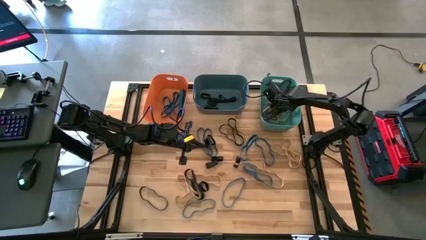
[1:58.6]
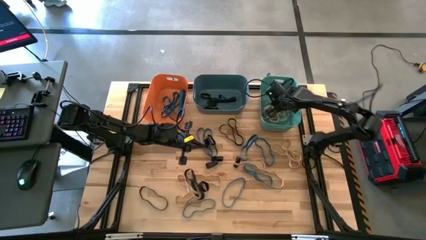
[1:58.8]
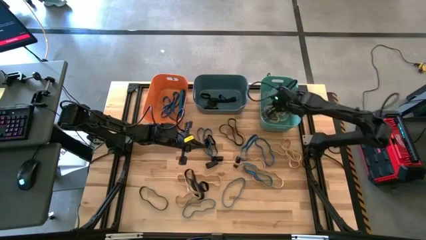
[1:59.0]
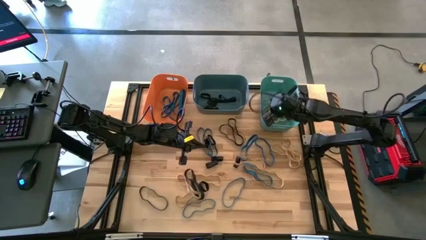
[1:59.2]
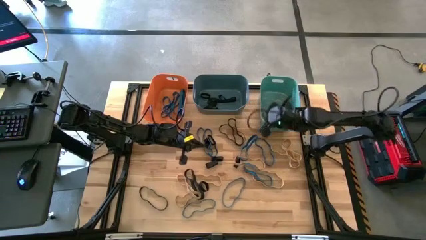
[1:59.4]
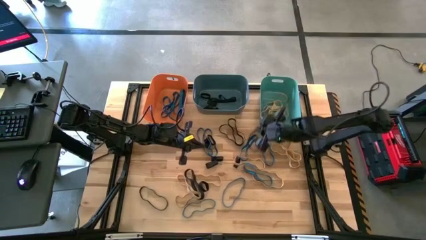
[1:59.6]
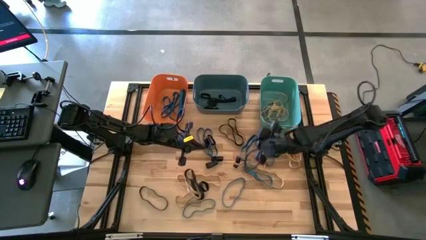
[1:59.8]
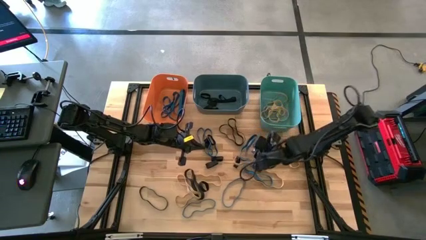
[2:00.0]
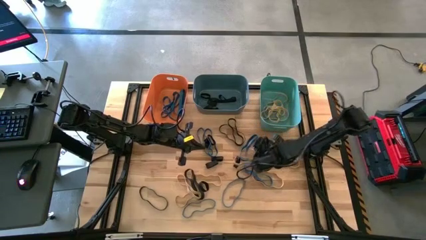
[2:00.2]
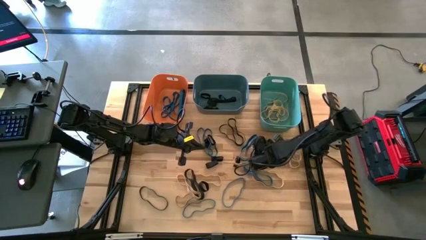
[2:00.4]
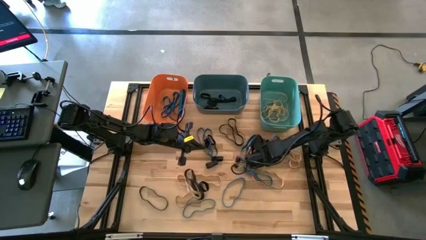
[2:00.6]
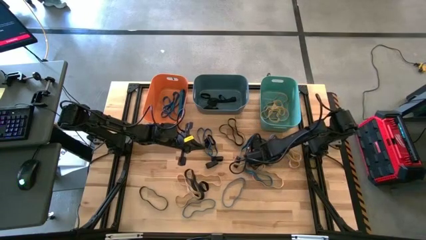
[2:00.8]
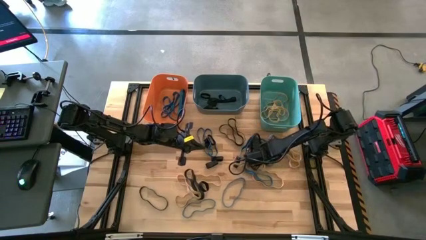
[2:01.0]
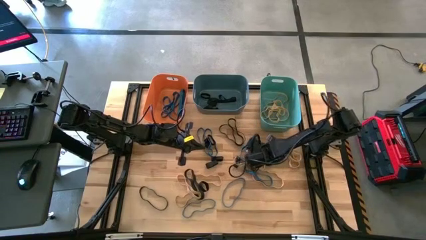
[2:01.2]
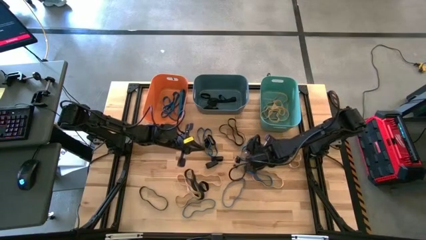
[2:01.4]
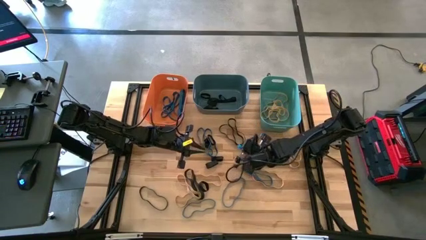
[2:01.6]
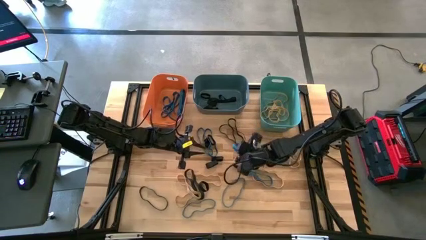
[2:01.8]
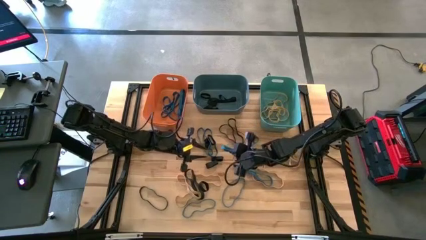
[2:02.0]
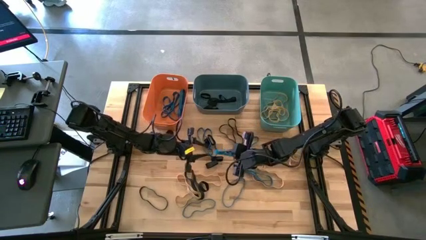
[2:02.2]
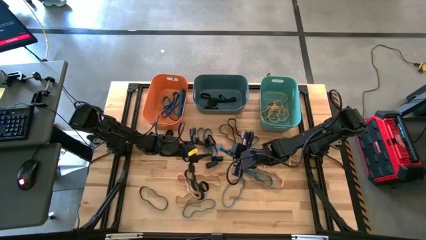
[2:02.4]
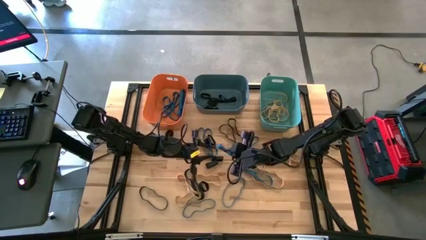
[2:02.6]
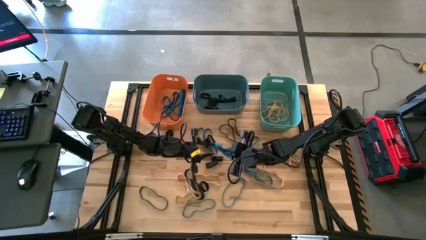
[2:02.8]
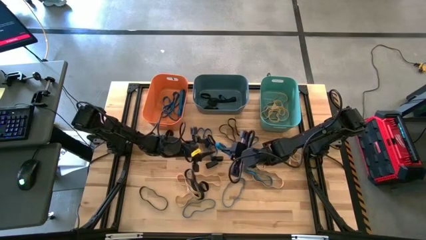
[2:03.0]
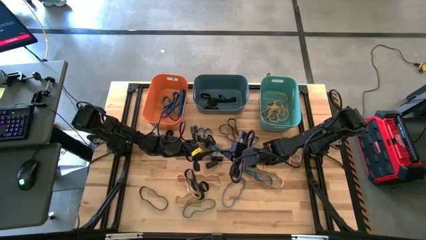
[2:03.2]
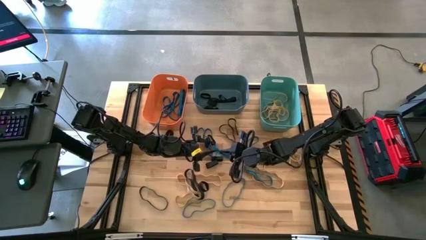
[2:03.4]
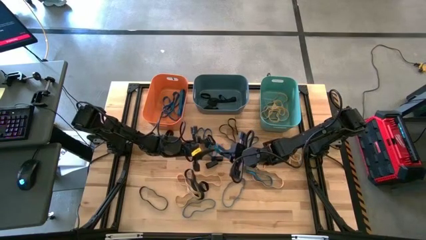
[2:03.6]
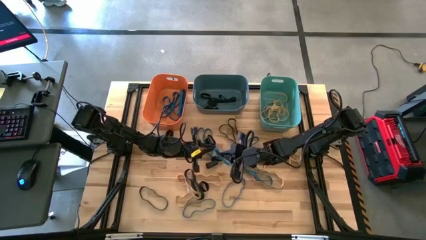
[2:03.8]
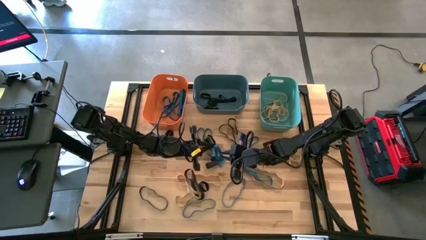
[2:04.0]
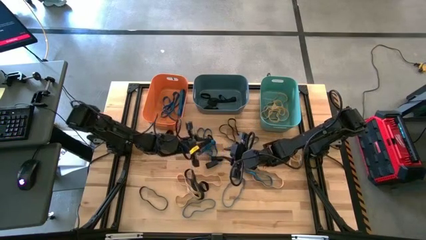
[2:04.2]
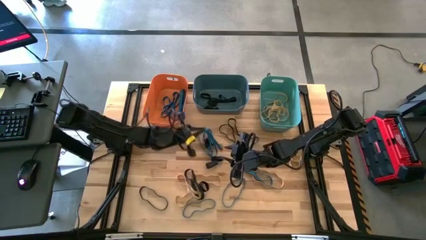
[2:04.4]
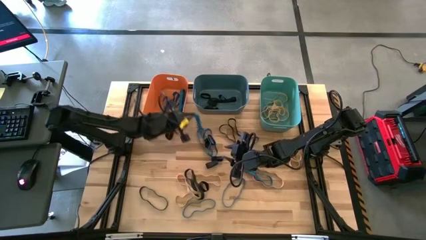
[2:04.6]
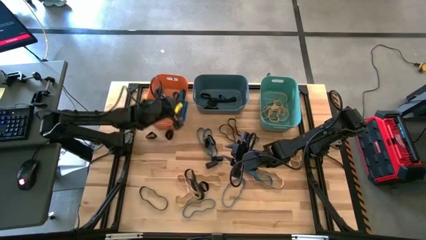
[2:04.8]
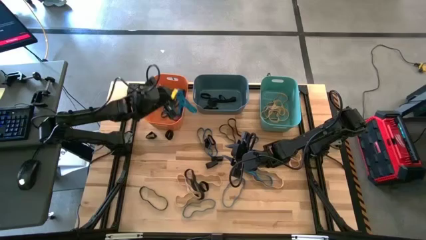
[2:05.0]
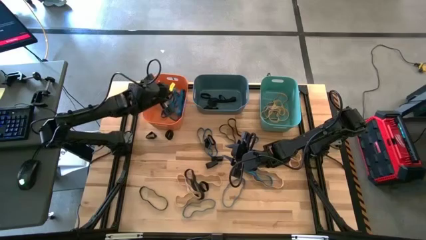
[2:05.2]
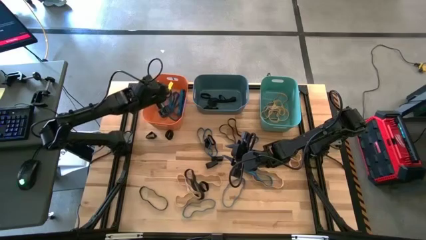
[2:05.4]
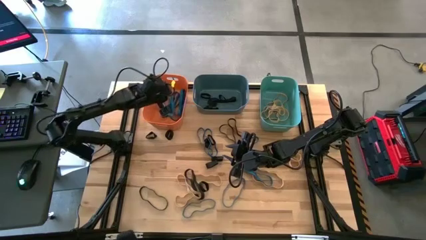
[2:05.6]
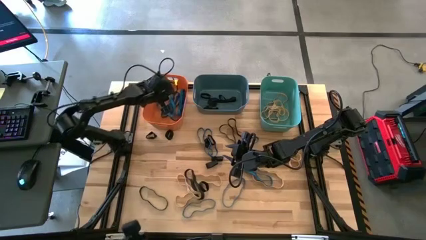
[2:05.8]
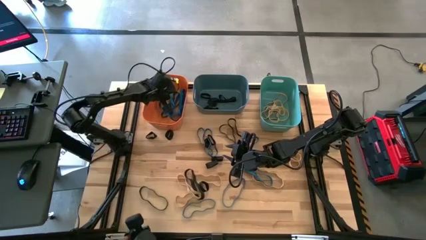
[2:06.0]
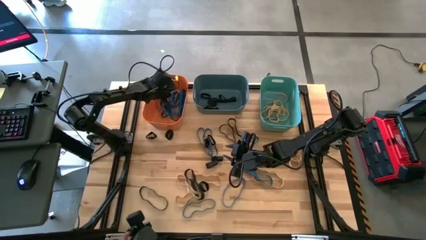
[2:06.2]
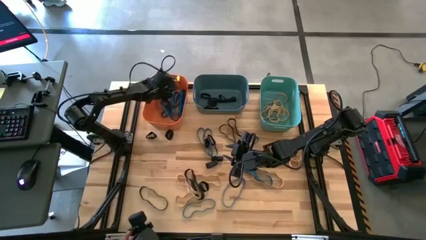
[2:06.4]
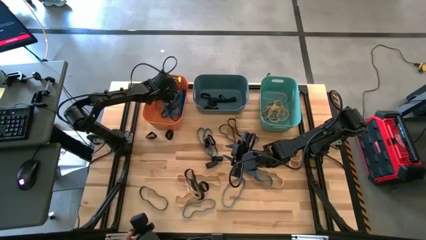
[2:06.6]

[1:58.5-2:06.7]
Task: Sort rubber bands into baskets
Put the blue rubber band into the orange bin

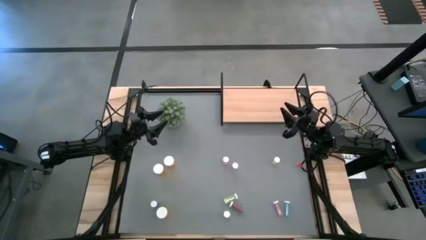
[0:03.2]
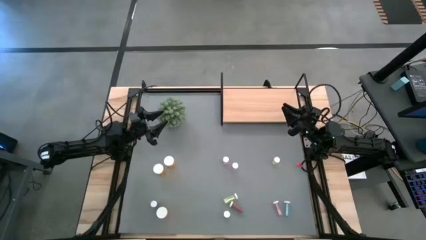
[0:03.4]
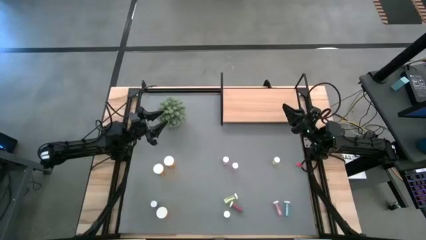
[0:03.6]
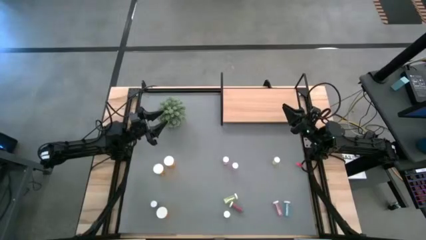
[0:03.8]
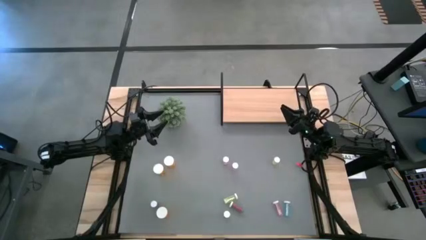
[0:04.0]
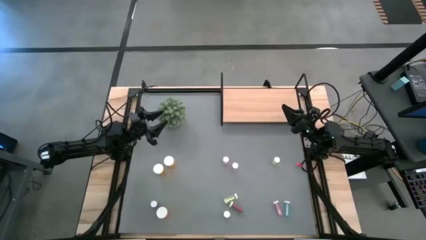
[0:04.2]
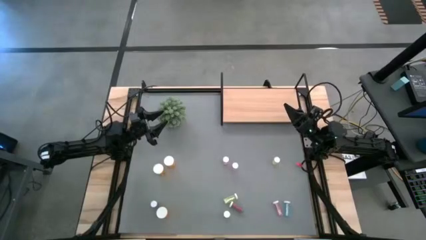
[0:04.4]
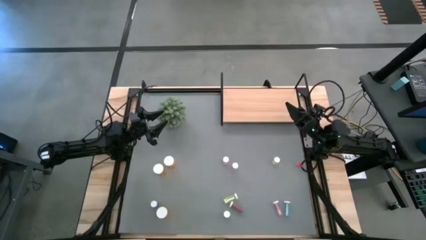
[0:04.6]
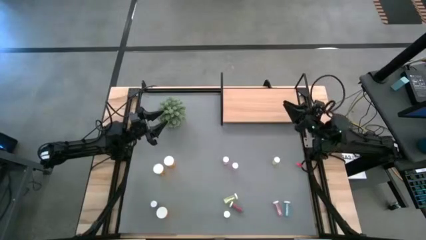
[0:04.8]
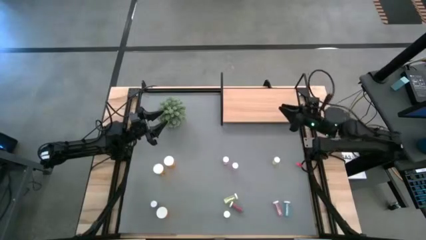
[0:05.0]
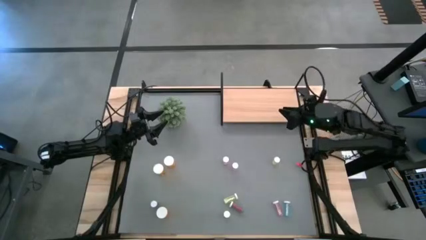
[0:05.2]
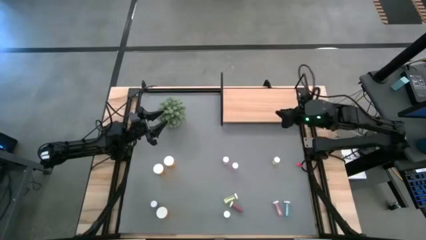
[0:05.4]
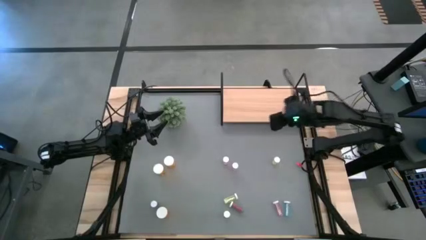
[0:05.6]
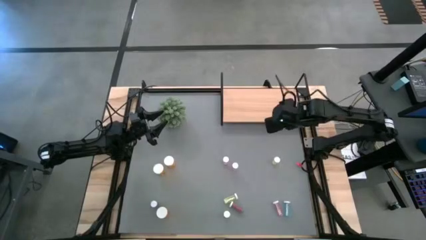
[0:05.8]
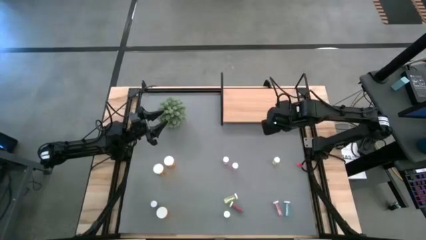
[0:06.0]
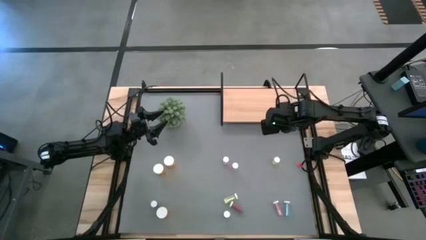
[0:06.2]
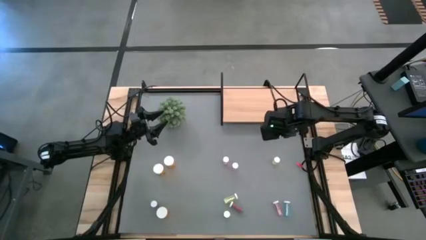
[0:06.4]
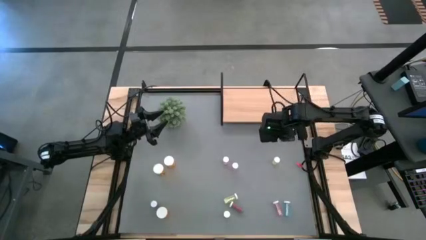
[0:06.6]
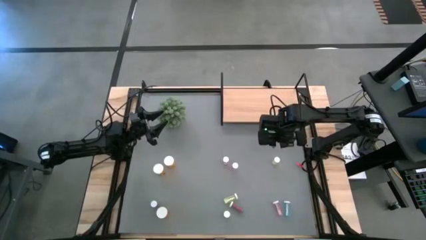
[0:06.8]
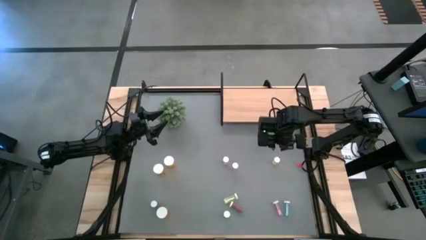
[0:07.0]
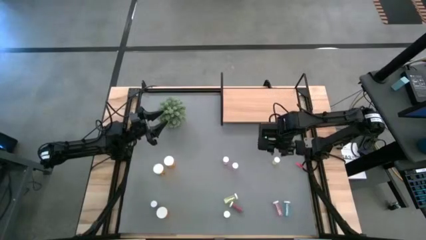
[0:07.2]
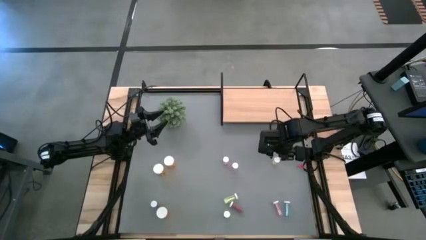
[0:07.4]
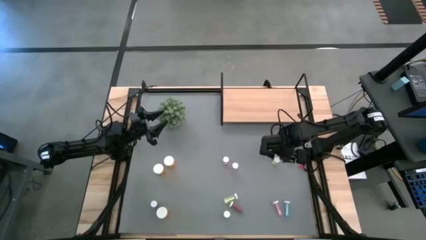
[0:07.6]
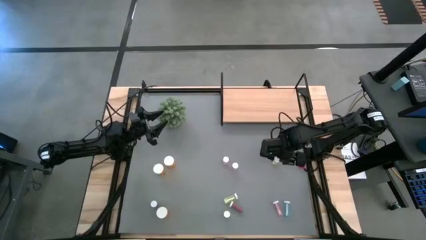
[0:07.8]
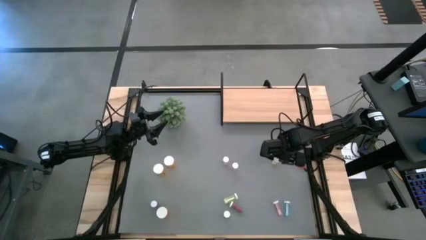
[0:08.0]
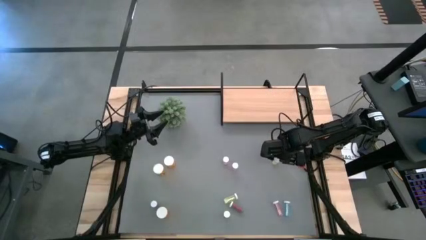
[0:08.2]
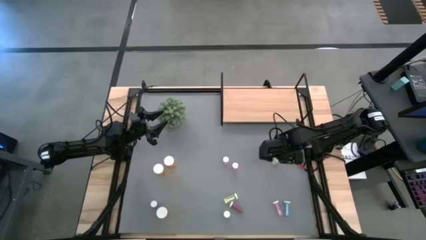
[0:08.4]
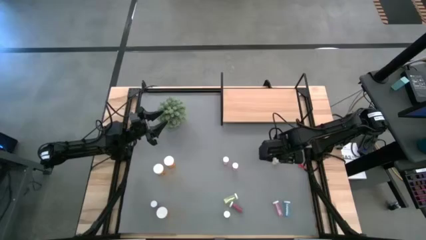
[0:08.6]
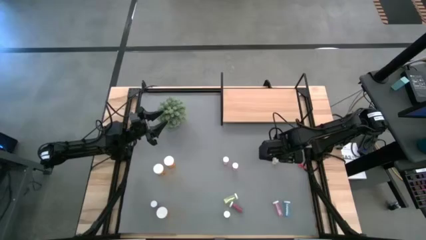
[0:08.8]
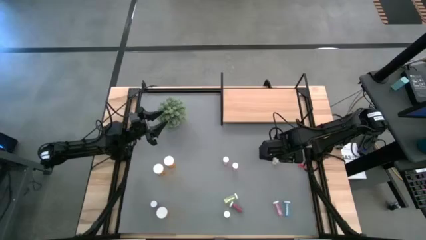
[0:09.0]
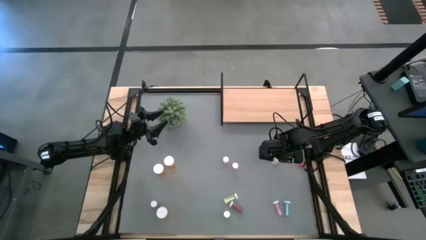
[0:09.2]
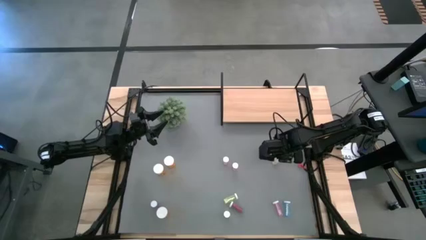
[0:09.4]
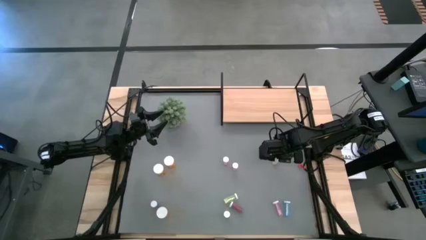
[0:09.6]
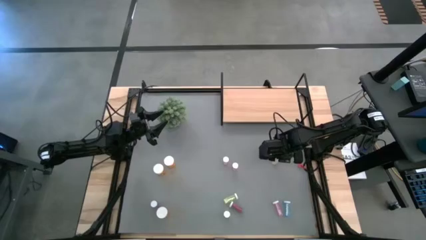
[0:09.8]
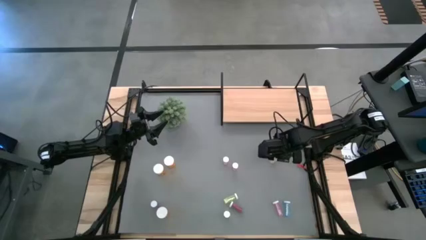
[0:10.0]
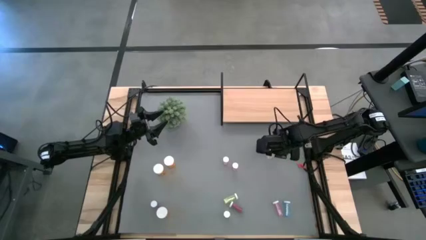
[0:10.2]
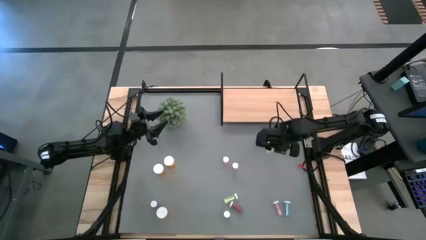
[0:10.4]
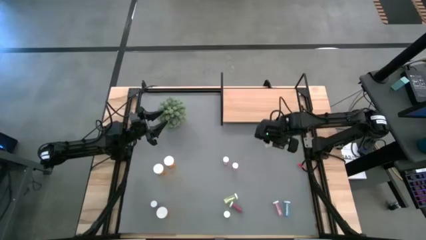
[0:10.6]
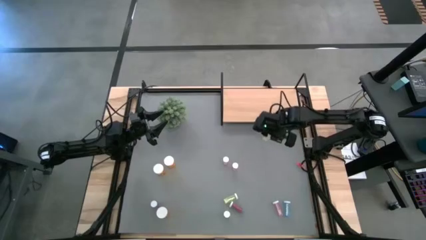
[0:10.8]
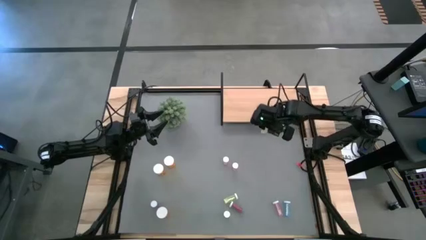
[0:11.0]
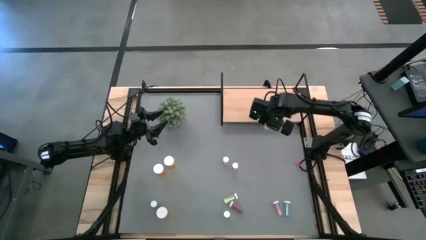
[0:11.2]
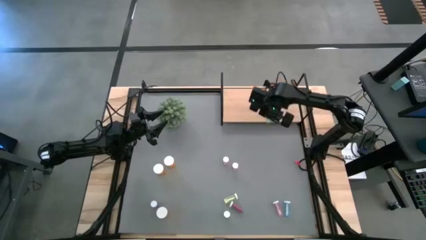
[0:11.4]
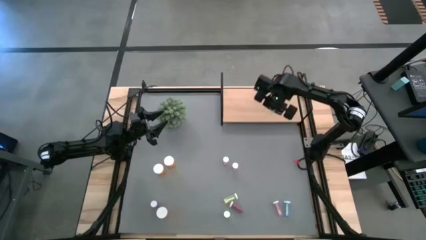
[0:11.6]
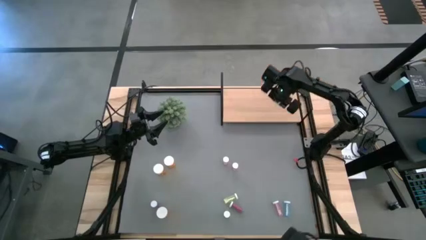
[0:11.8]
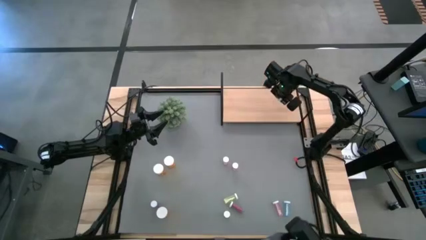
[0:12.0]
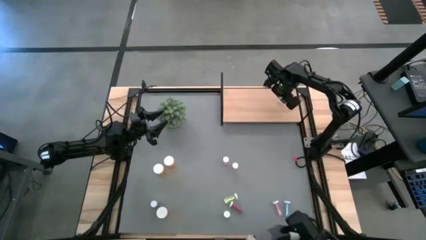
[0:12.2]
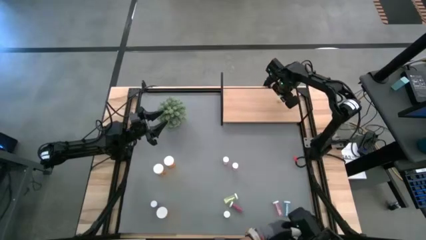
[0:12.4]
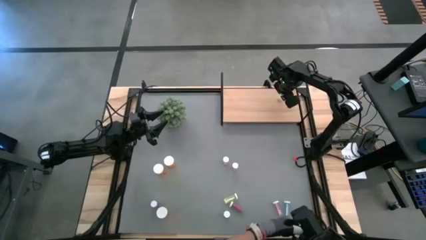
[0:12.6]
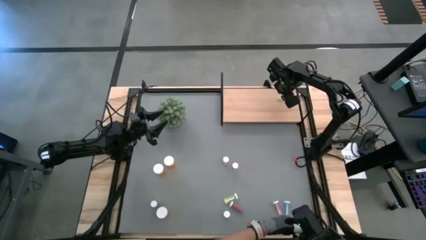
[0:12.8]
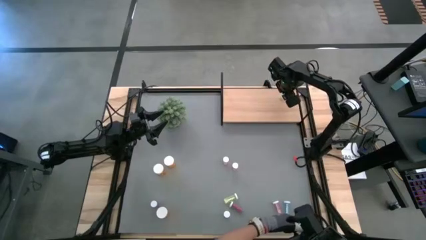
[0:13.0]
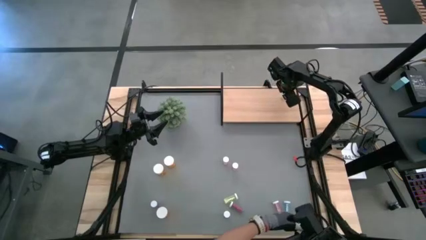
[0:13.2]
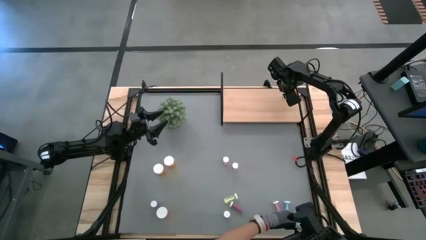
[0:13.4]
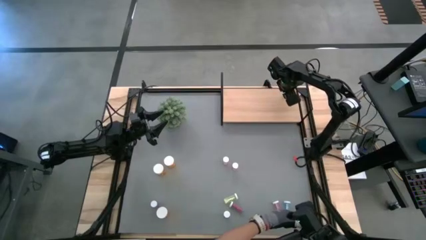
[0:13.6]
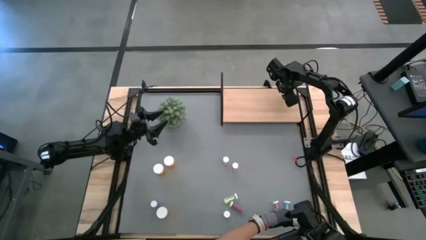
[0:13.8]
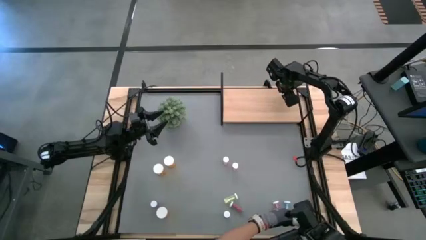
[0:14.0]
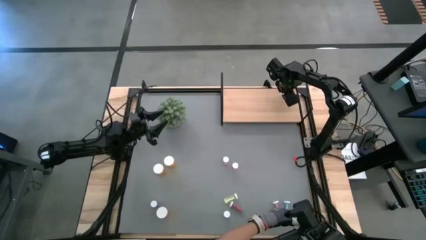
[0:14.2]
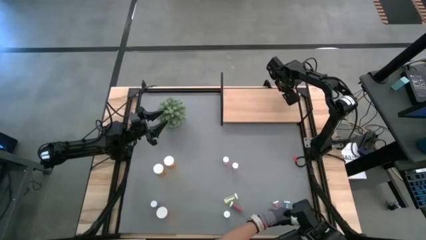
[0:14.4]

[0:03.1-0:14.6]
Task: Pick and place medicine bottles onto shelf by color
Put the top right yellow pill bottle on the shelf
